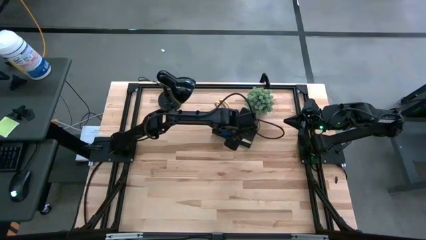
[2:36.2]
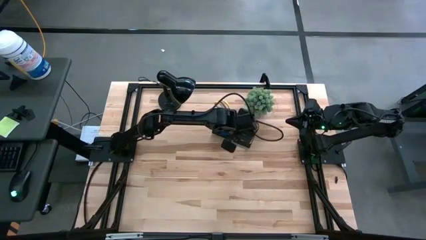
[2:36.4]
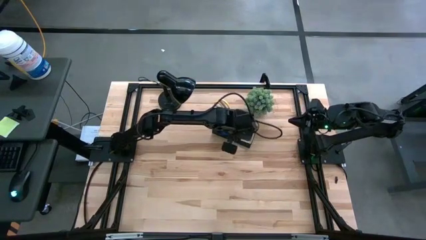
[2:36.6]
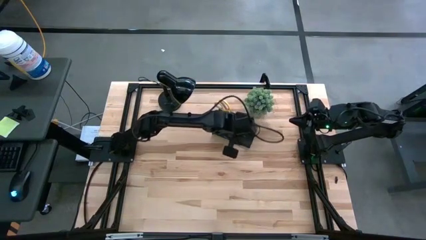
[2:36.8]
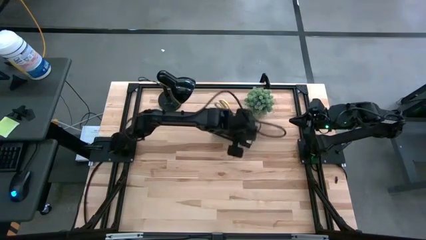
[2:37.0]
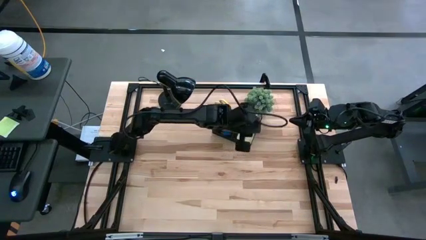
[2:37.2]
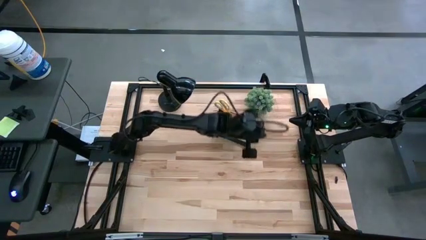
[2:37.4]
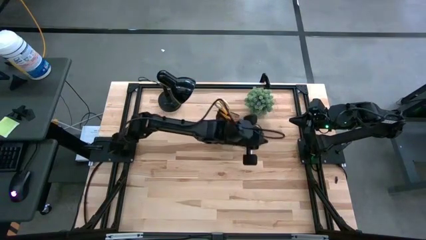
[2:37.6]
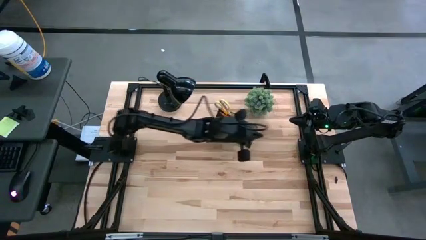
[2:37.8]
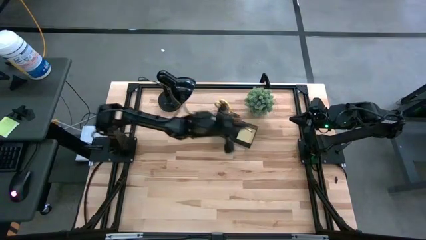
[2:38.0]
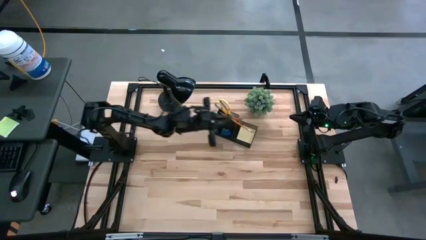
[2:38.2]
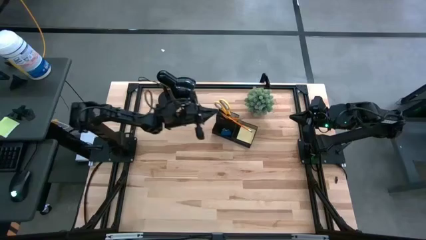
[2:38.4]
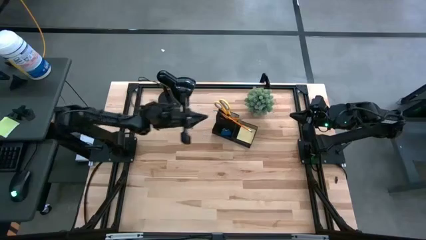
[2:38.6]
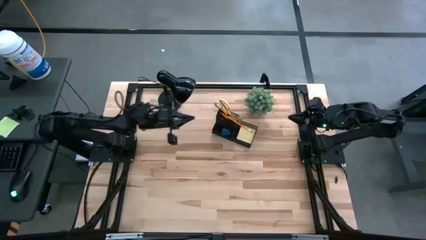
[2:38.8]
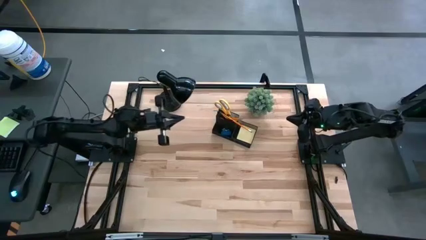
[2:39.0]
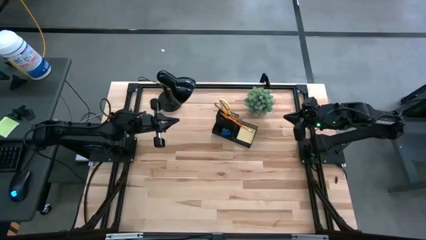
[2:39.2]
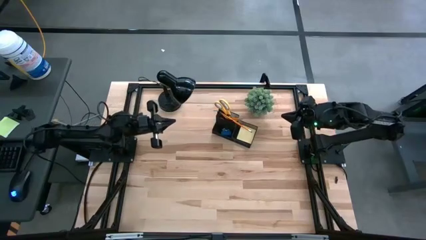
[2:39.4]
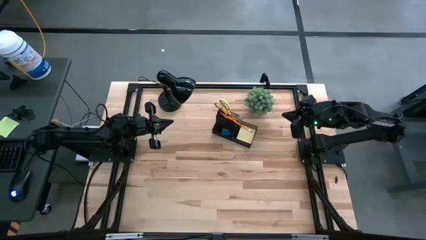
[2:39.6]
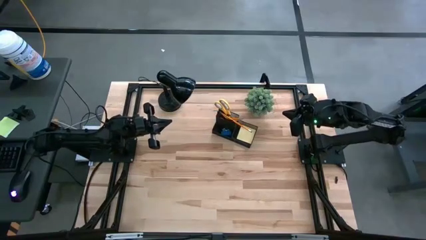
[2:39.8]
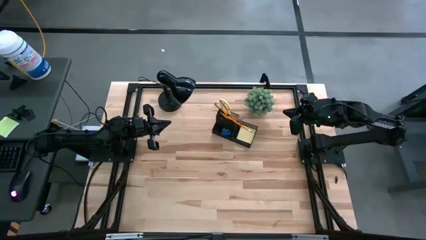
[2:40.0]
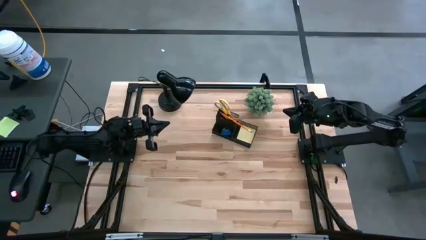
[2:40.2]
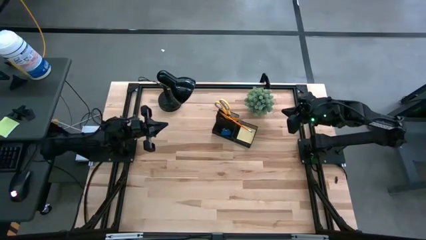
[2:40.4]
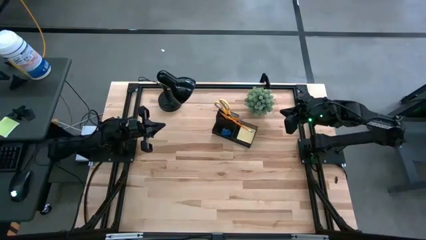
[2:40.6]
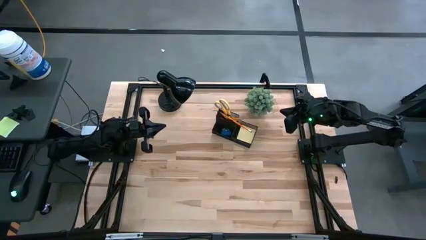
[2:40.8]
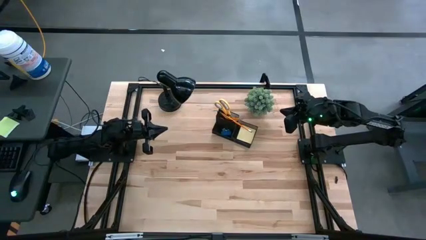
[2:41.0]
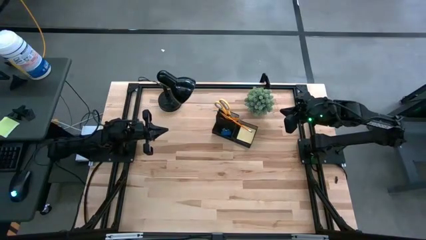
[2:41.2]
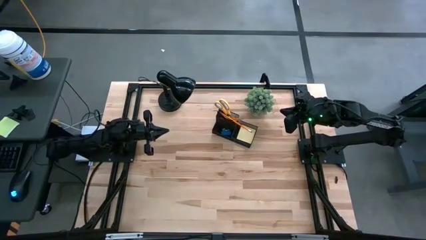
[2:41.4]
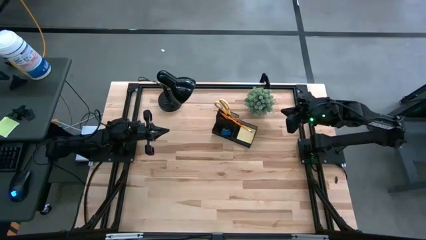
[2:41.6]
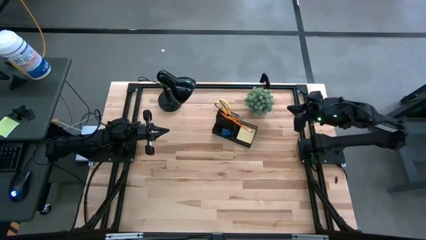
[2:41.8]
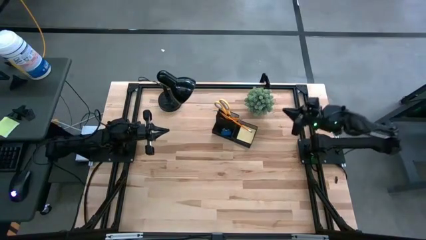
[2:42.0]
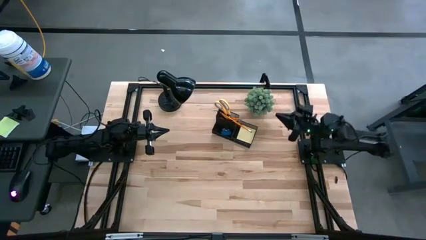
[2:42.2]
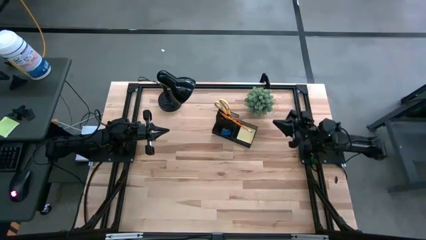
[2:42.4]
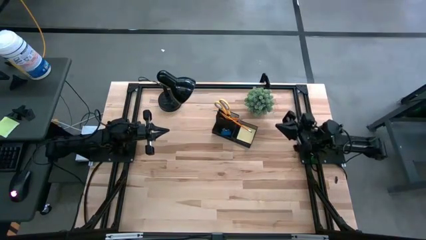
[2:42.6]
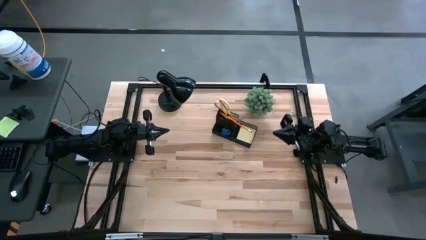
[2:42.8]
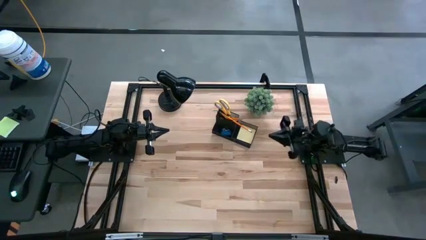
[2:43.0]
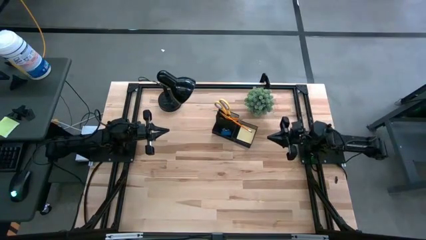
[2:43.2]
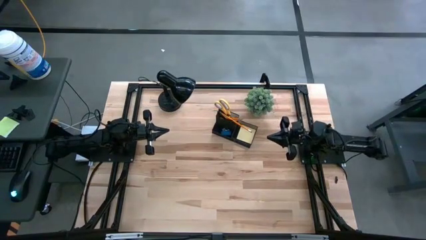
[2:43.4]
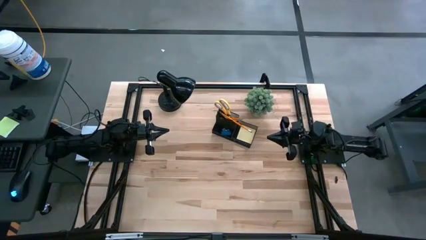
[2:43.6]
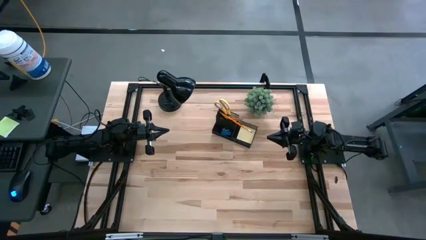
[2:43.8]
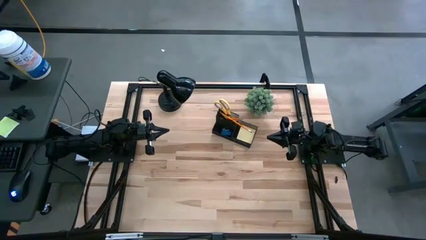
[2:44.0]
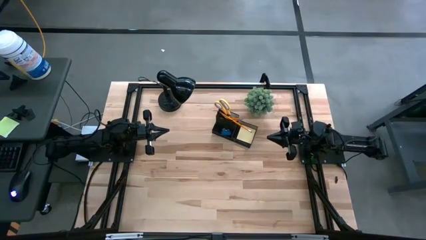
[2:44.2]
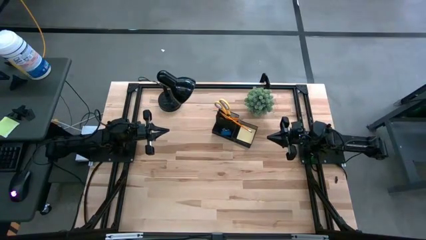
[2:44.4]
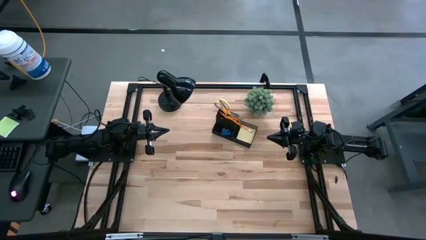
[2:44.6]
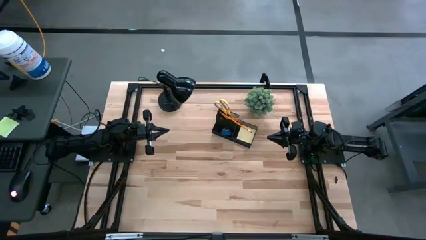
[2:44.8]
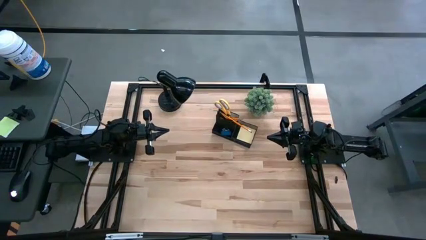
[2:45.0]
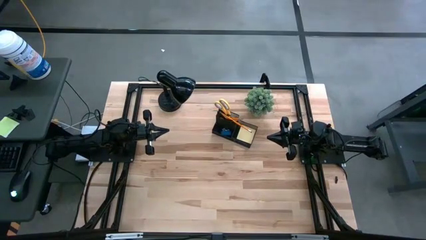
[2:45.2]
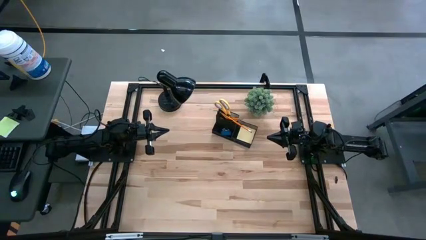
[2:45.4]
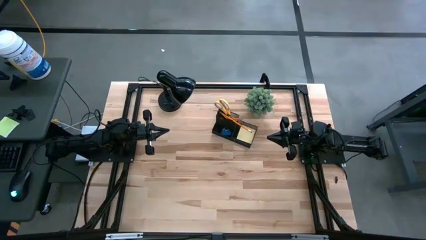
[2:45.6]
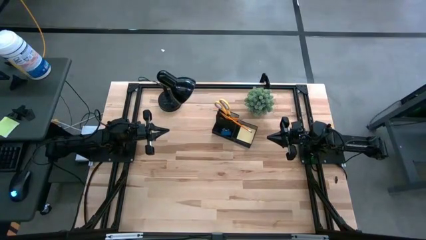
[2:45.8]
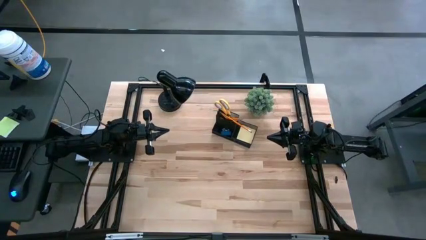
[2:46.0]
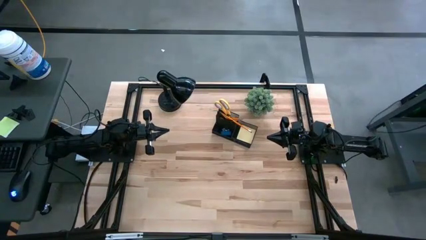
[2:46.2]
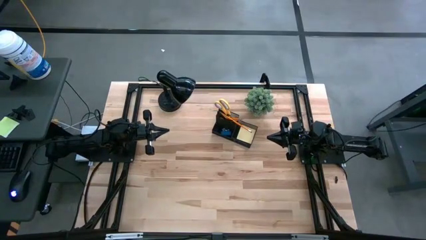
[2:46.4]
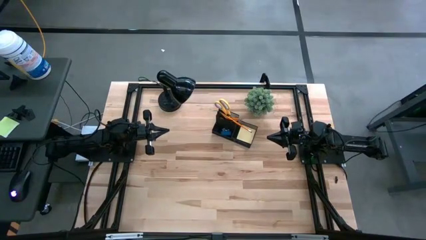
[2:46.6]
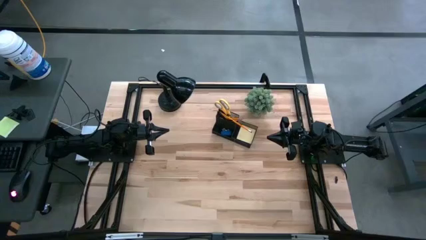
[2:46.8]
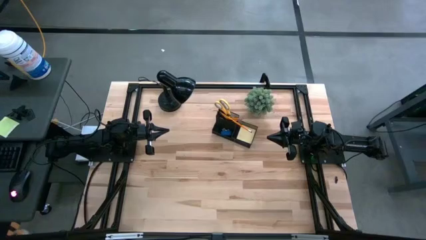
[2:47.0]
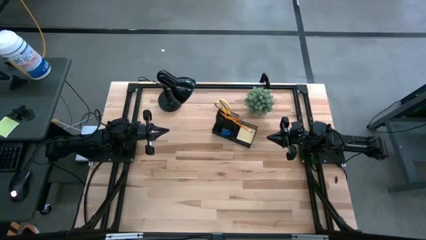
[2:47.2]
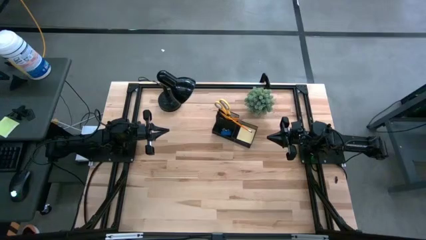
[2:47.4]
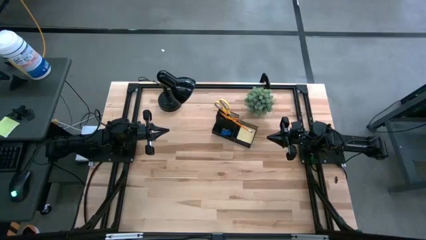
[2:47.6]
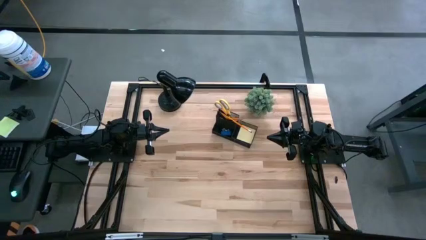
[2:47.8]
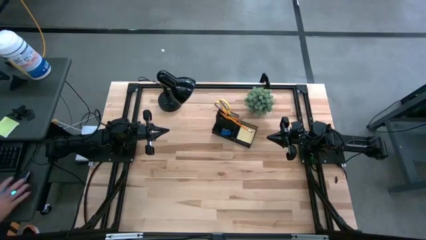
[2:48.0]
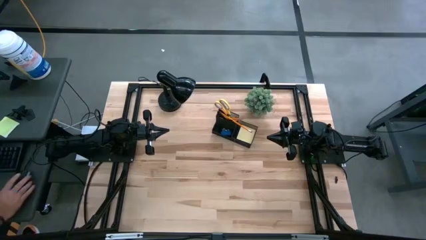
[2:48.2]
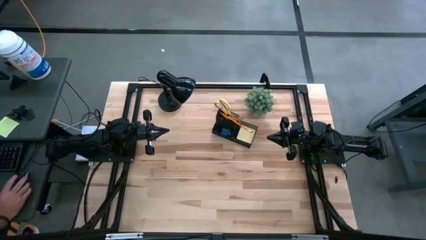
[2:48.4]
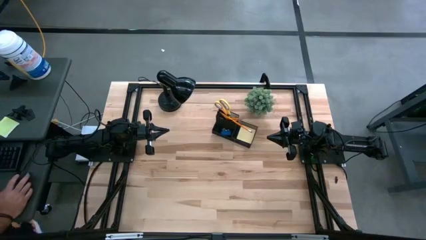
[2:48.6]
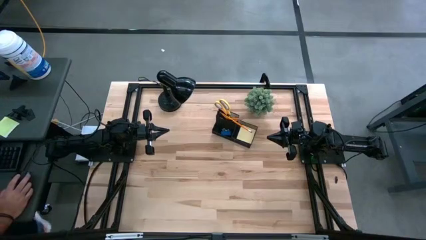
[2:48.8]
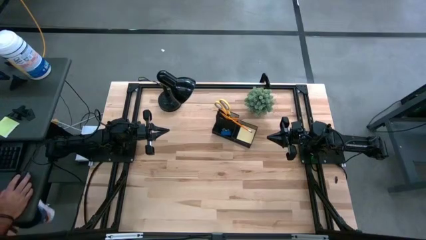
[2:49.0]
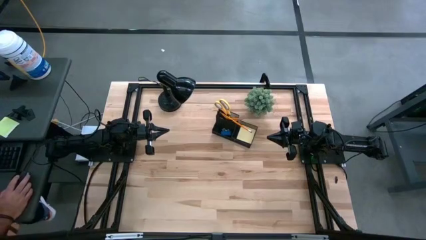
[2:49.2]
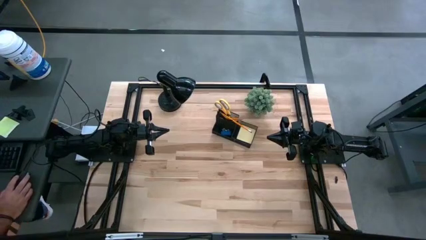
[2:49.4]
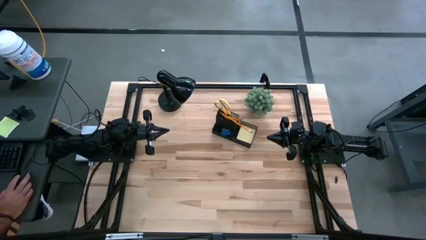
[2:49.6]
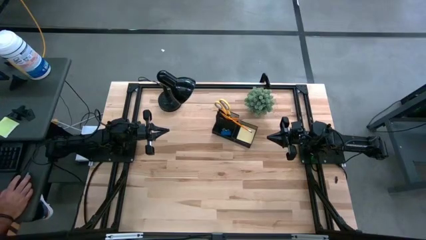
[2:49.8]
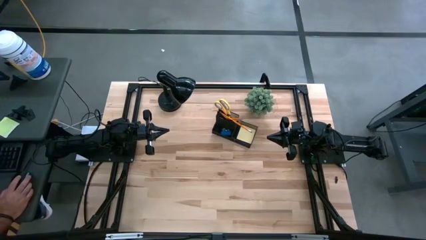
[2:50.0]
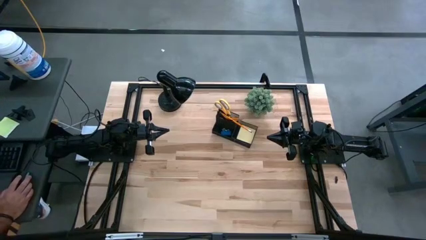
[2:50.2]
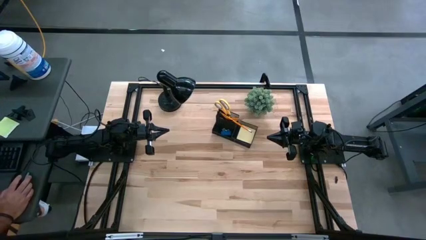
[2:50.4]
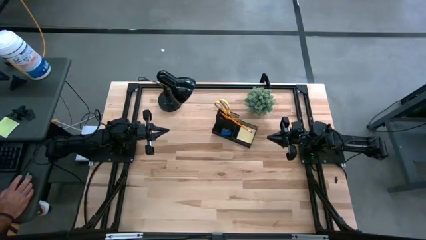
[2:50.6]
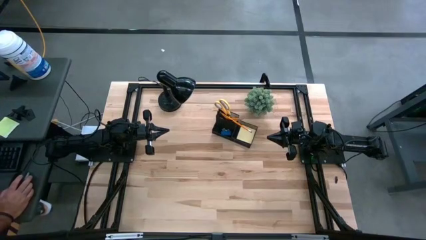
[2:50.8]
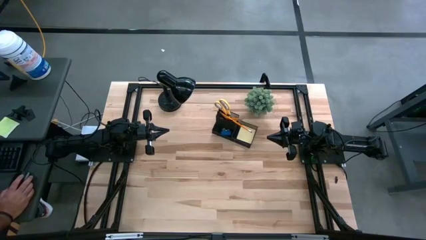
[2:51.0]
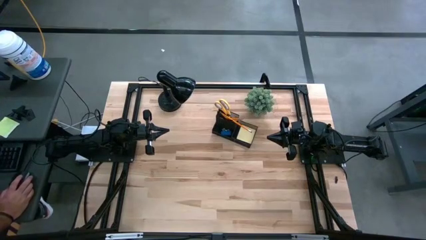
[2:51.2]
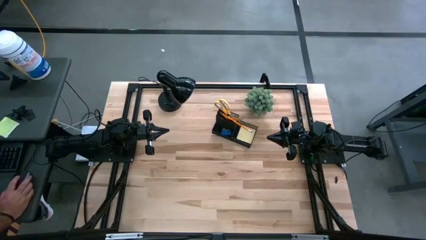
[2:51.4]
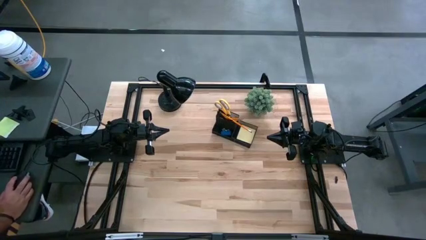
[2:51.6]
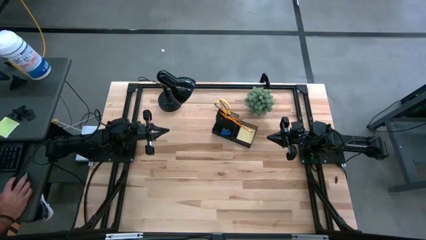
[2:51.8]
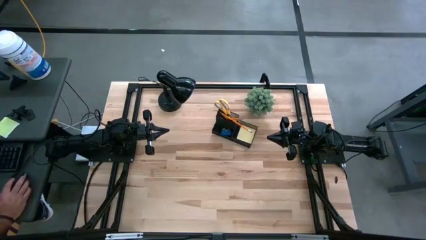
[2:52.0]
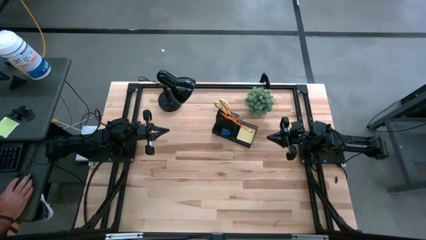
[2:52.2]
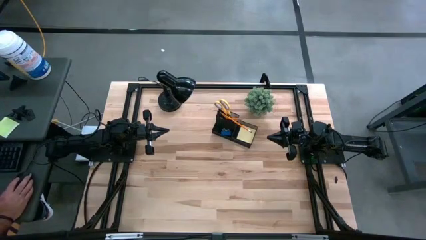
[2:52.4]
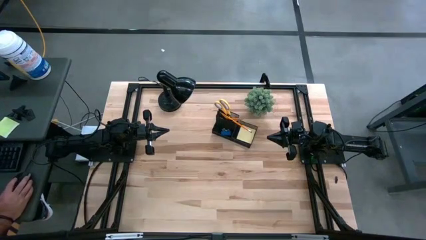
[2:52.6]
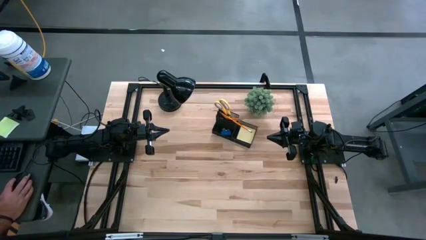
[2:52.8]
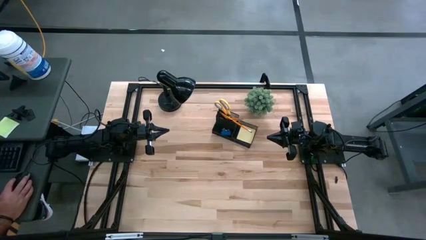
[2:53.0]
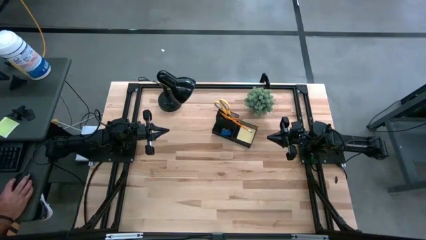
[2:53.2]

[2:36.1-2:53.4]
Task: Pick and place office supplies into organizer
Return to Home Position
